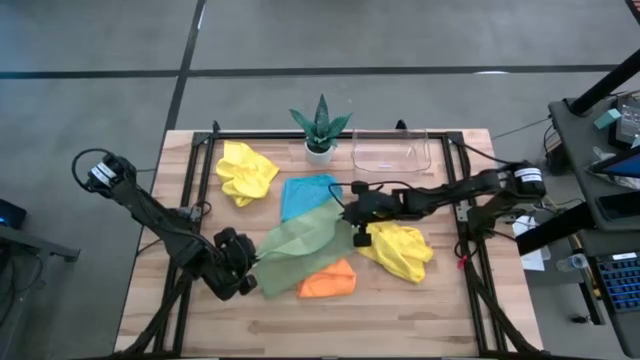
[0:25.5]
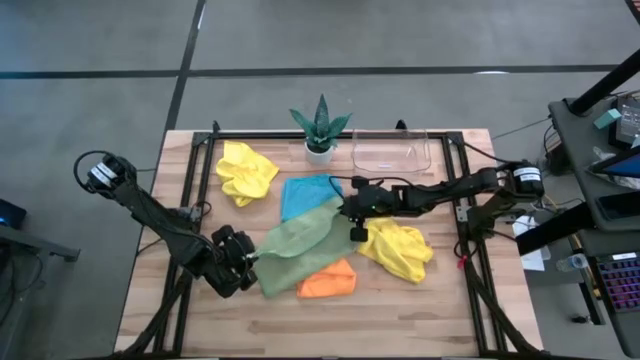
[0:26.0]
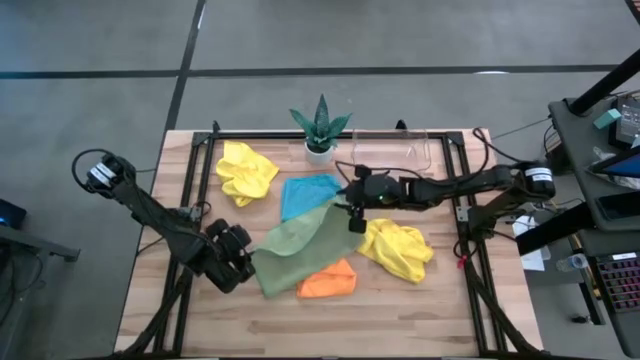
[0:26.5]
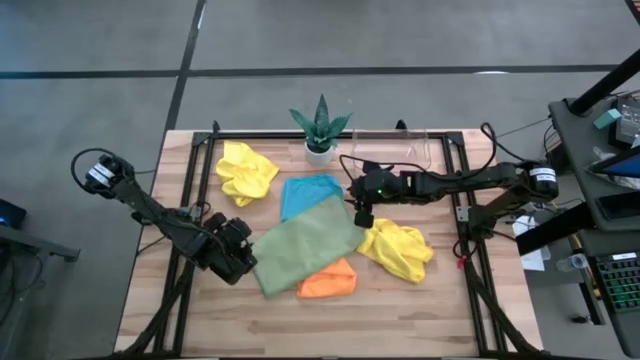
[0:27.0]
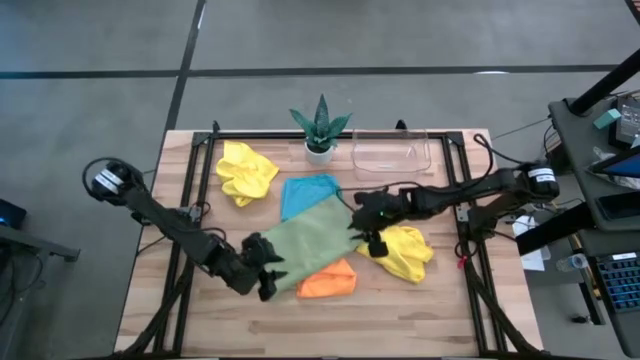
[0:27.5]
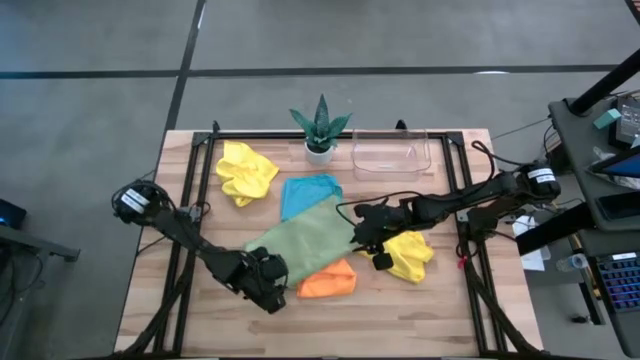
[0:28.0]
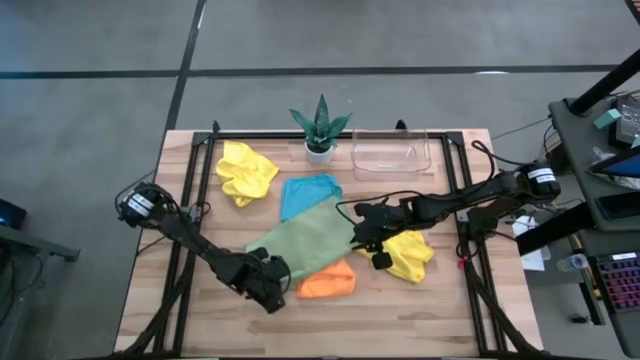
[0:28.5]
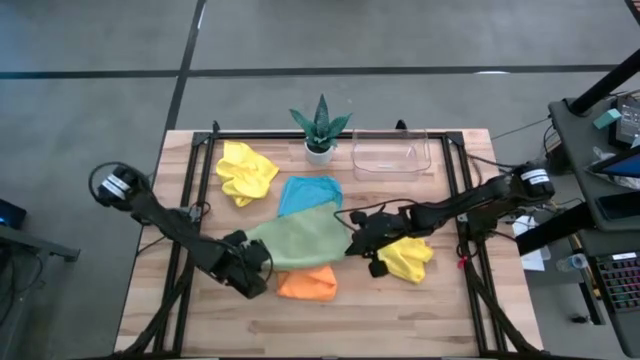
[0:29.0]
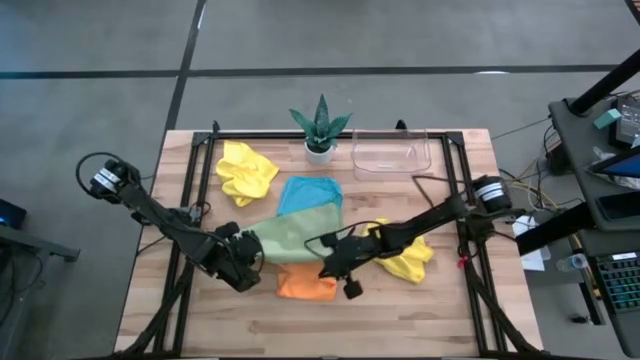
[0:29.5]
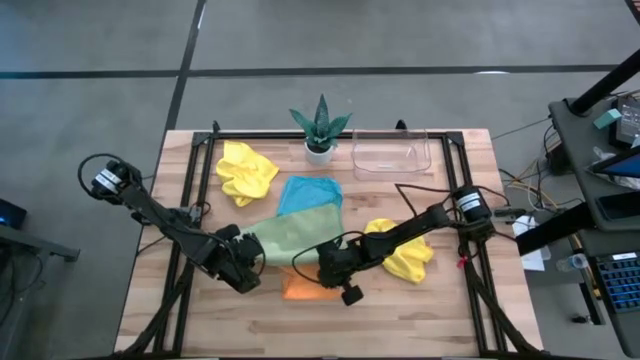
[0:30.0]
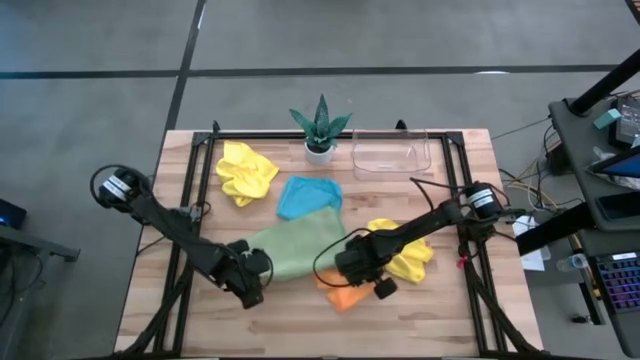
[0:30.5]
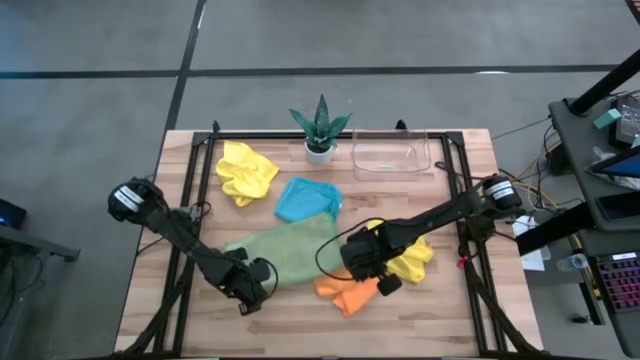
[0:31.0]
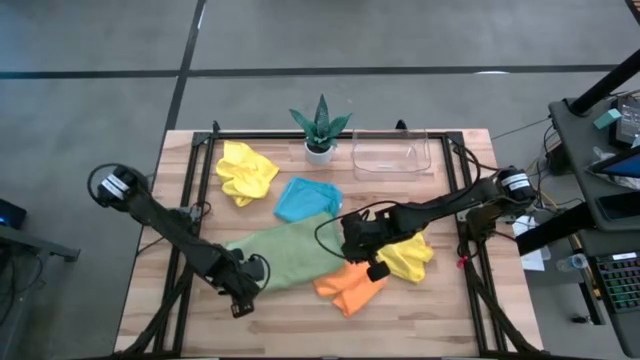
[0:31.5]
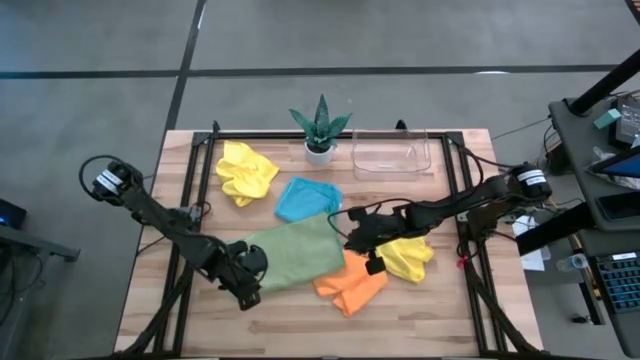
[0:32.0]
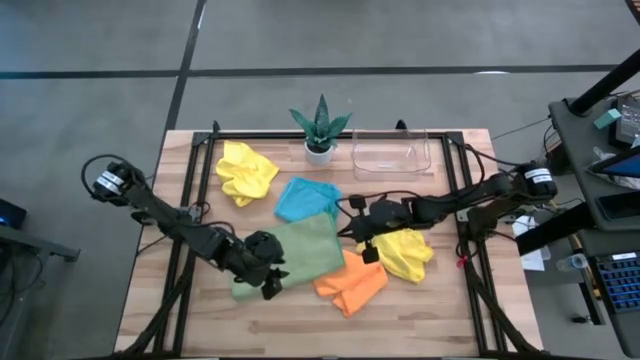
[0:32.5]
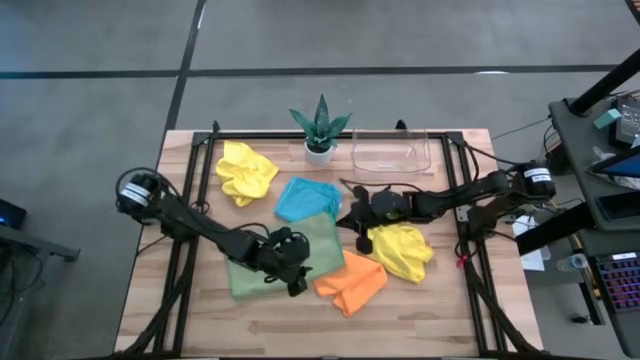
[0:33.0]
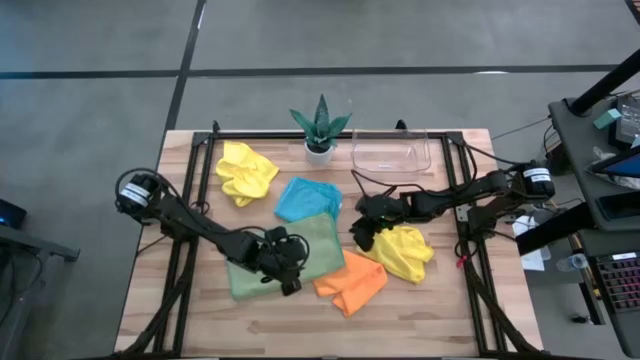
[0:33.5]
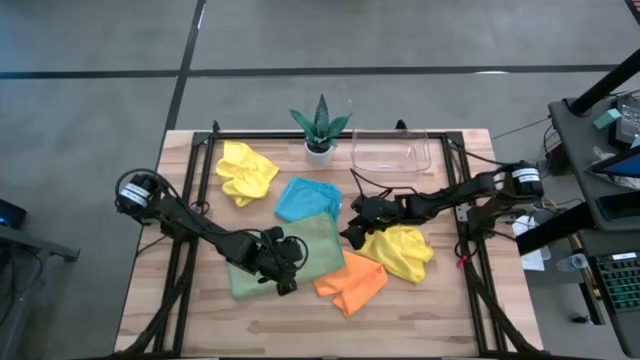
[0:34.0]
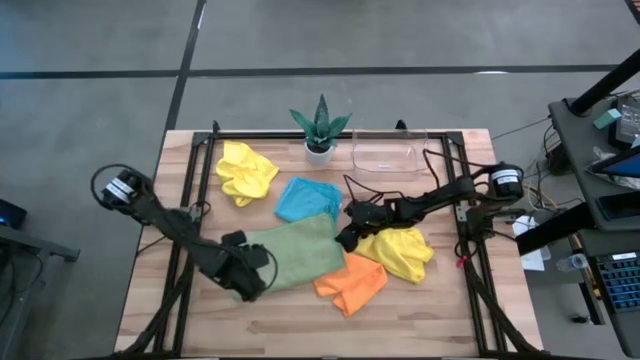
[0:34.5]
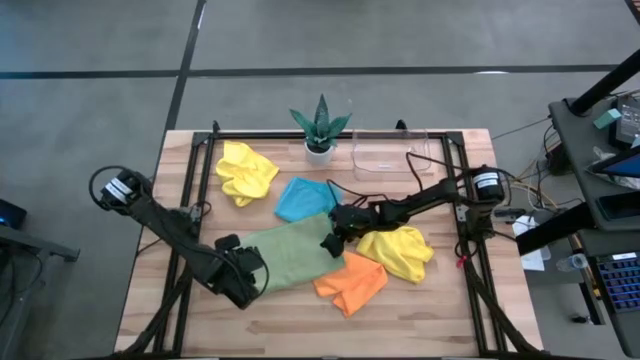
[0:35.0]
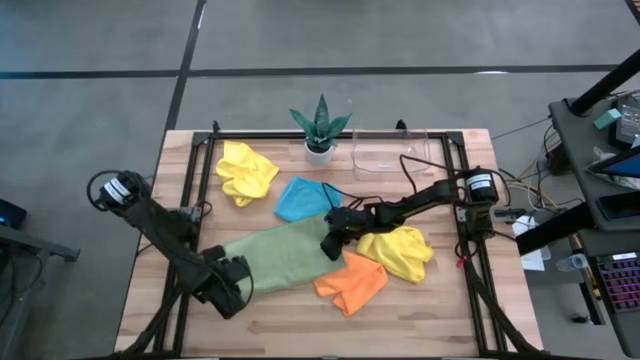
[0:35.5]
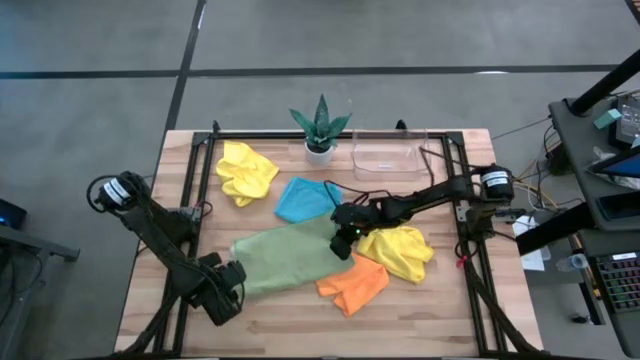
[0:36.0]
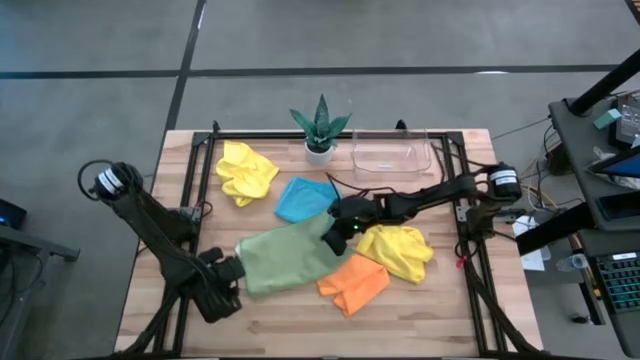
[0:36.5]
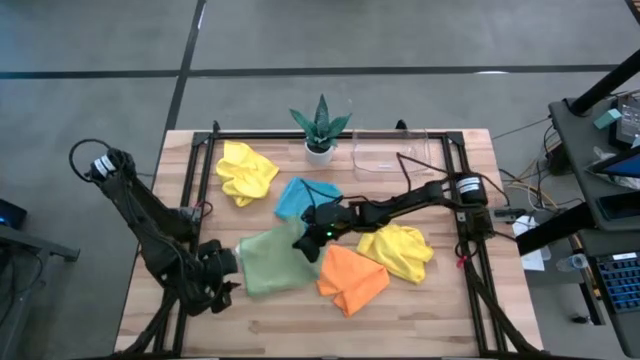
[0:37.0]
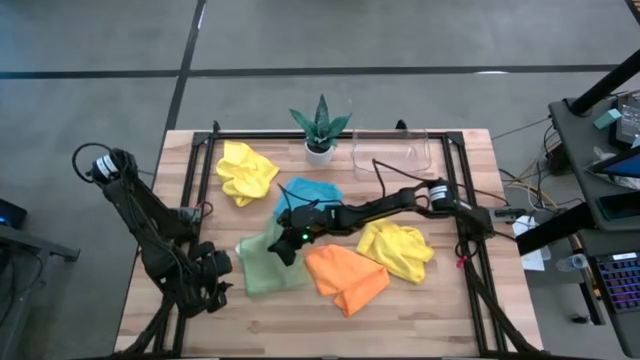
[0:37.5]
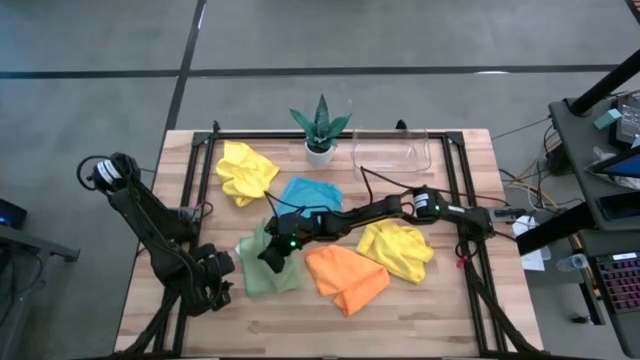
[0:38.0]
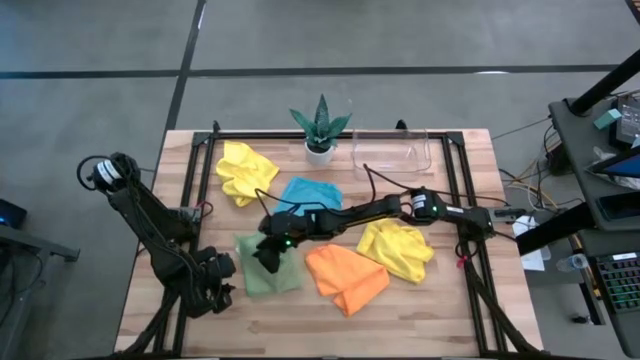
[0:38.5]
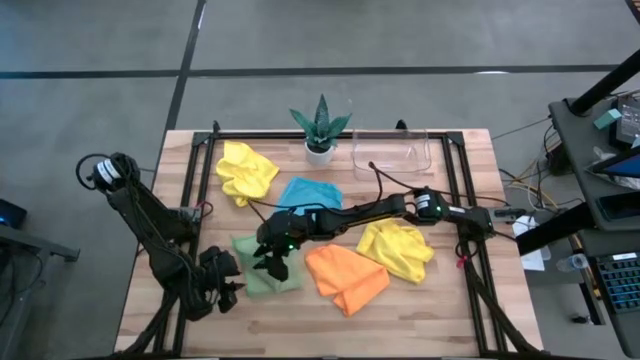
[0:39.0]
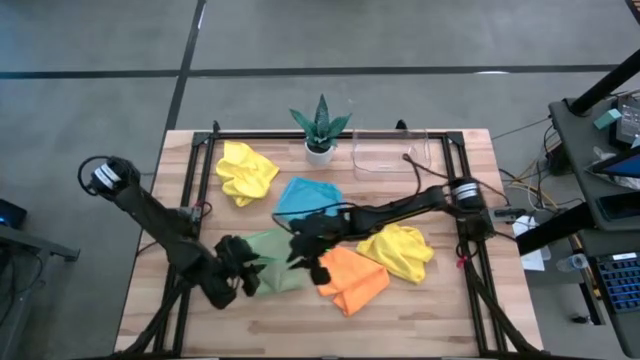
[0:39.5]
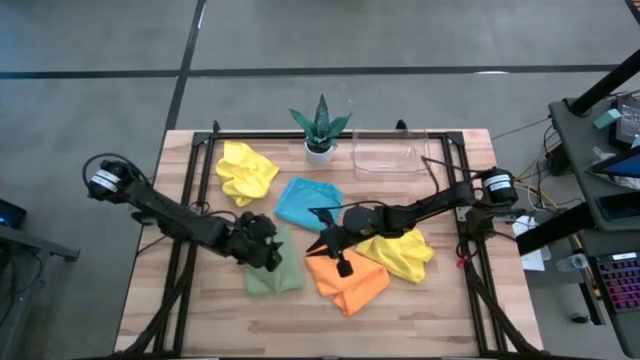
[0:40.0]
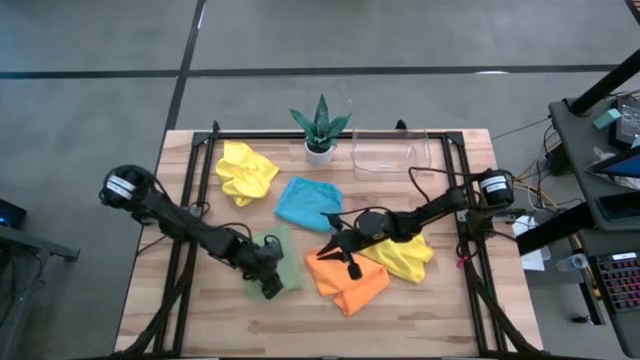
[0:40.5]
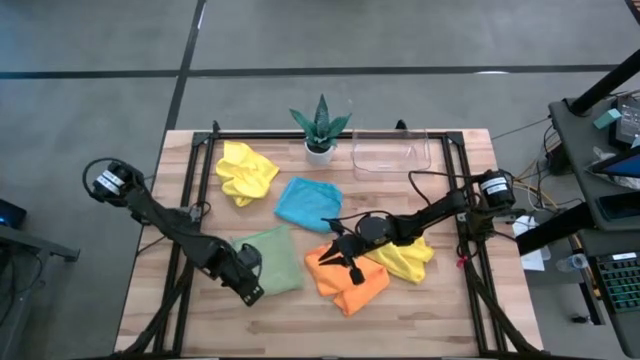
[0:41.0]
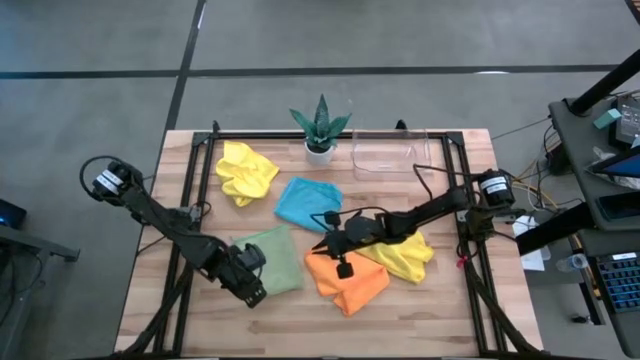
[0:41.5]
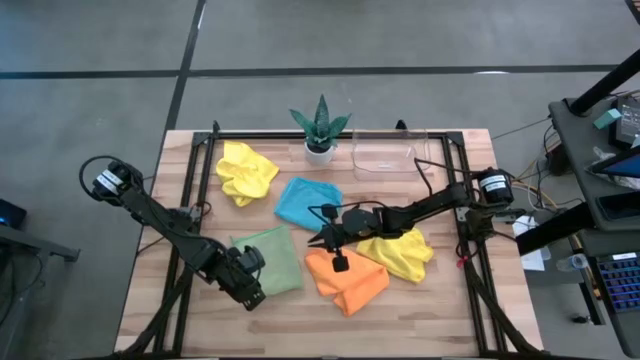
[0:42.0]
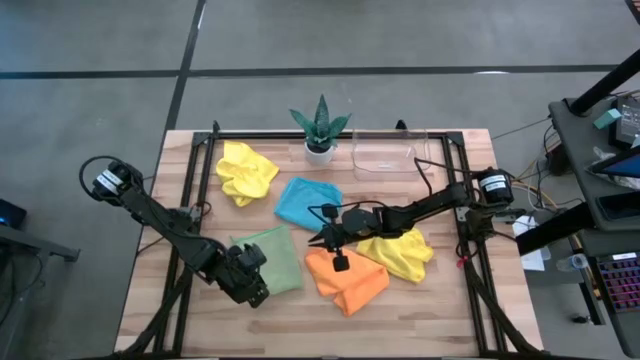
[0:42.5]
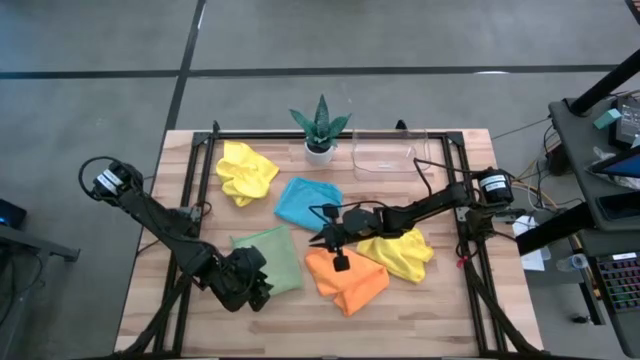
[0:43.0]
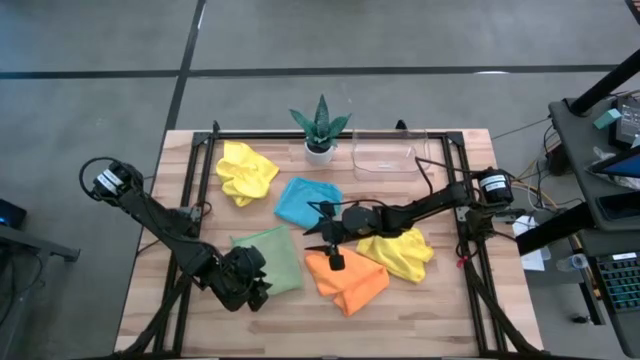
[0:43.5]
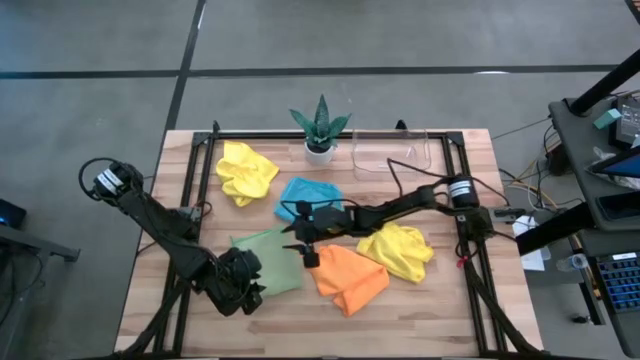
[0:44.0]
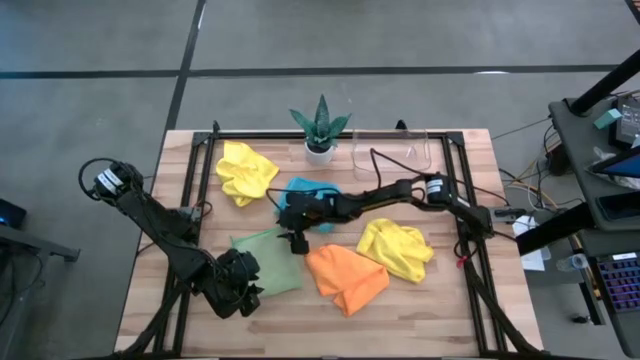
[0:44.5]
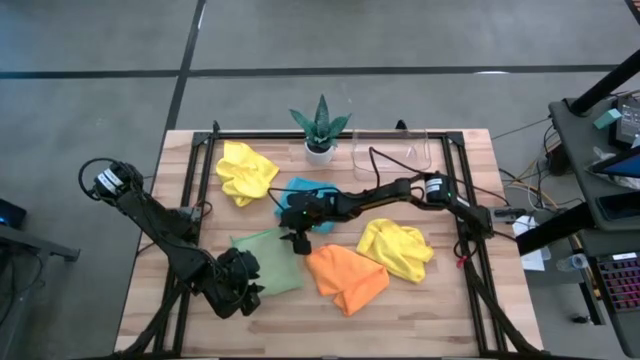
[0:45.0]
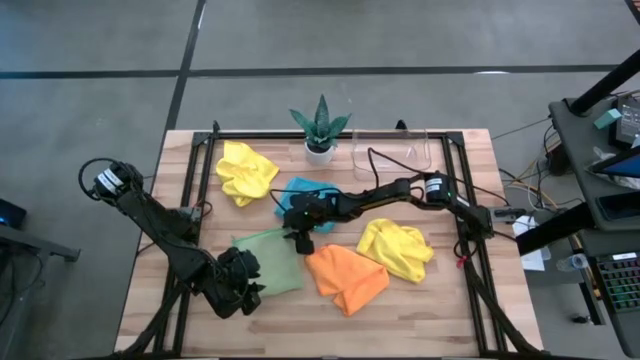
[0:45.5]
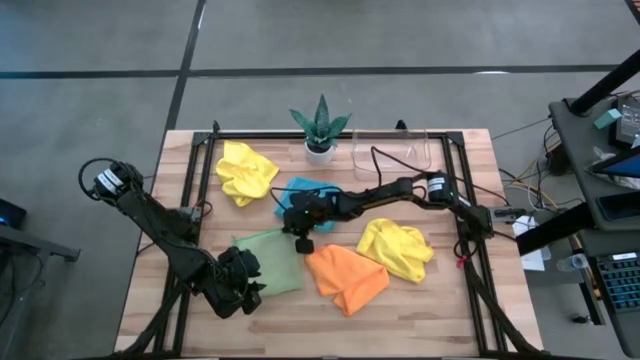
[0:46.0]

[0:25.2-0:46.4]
Task: Fold microfiber towels
Fold the green microfiber towel
